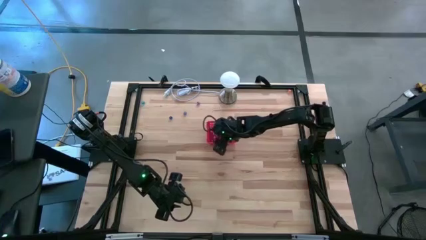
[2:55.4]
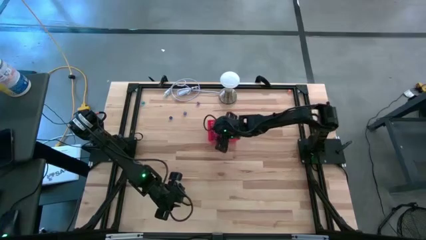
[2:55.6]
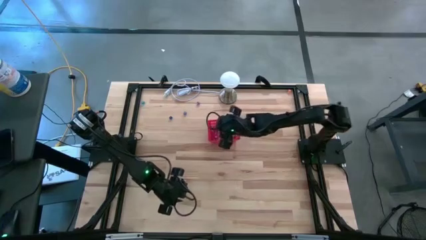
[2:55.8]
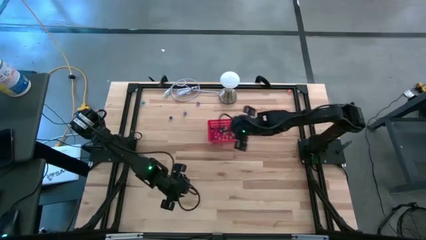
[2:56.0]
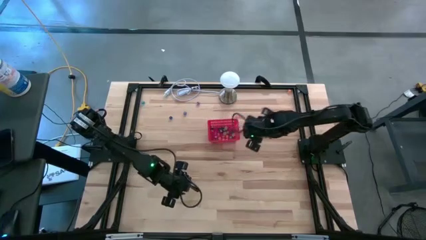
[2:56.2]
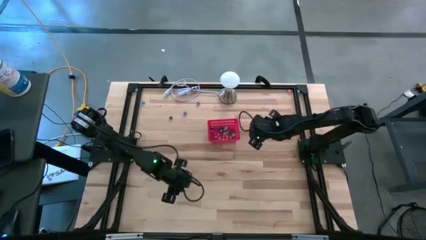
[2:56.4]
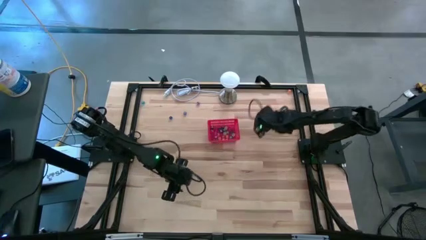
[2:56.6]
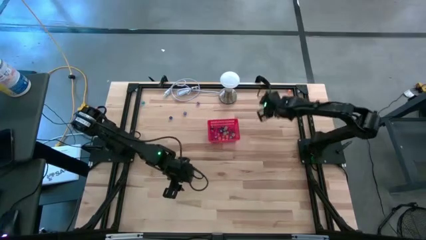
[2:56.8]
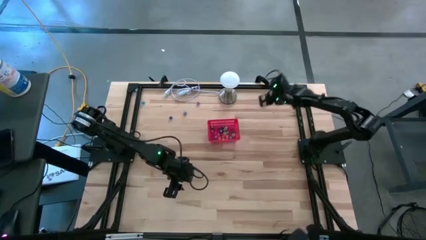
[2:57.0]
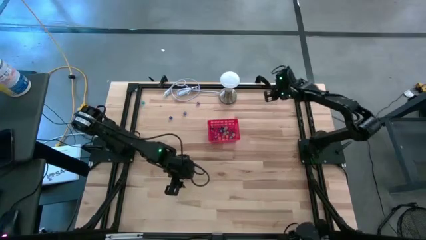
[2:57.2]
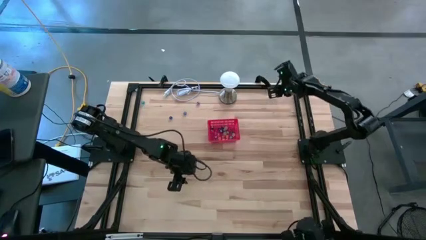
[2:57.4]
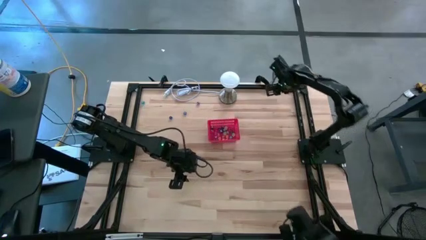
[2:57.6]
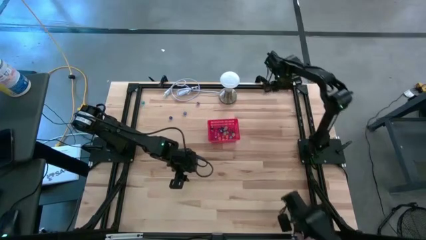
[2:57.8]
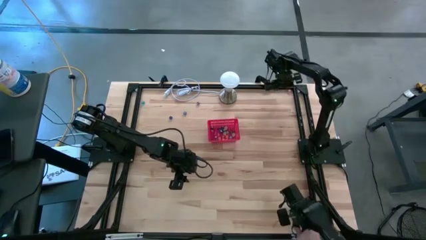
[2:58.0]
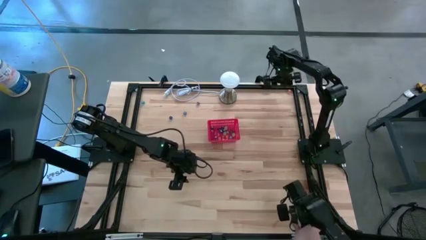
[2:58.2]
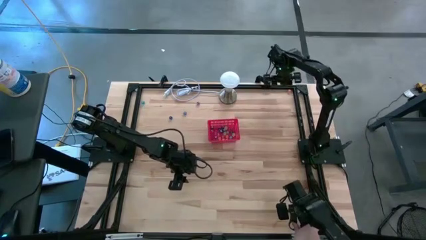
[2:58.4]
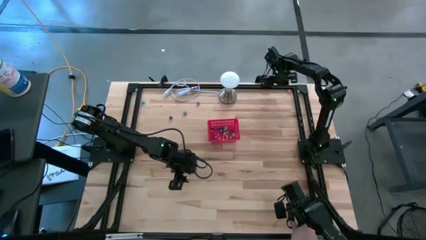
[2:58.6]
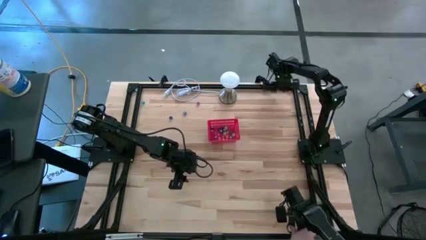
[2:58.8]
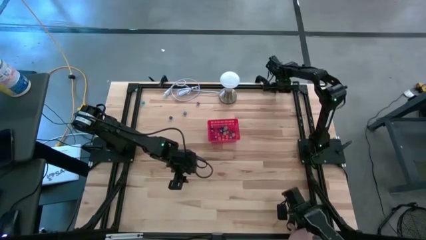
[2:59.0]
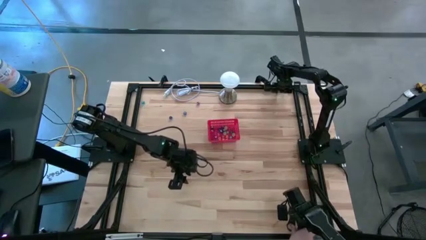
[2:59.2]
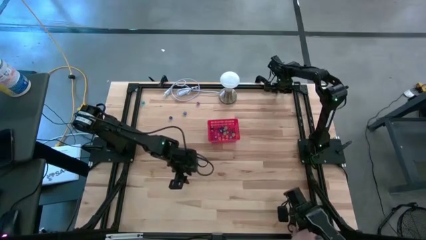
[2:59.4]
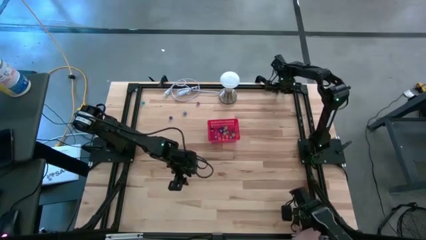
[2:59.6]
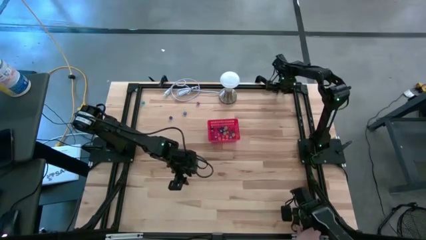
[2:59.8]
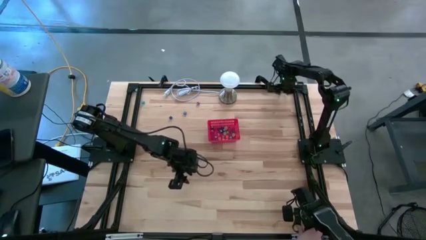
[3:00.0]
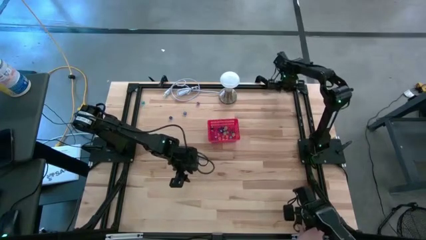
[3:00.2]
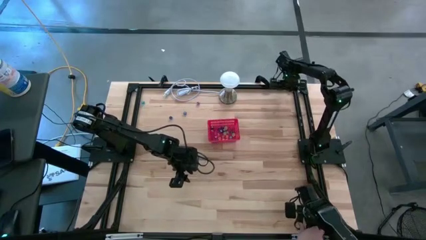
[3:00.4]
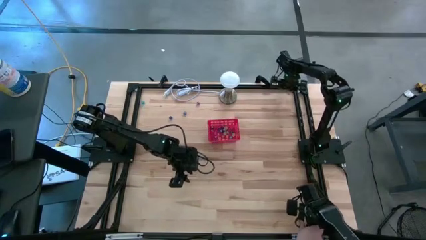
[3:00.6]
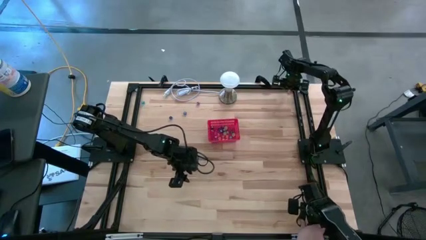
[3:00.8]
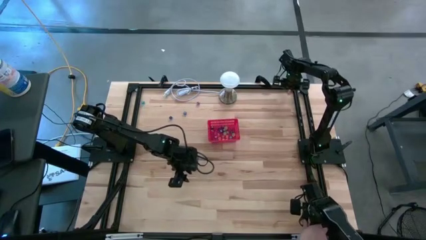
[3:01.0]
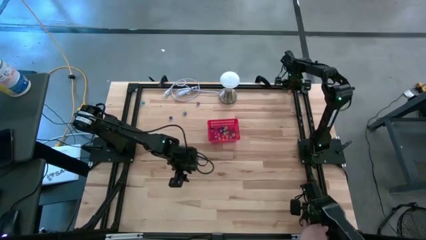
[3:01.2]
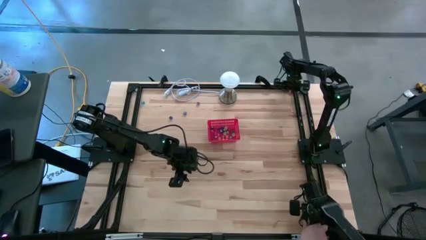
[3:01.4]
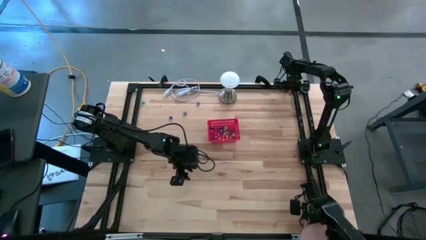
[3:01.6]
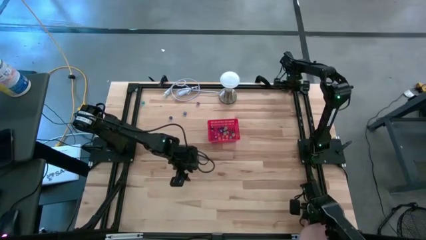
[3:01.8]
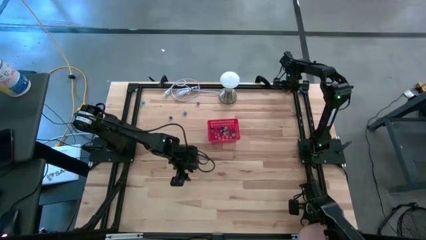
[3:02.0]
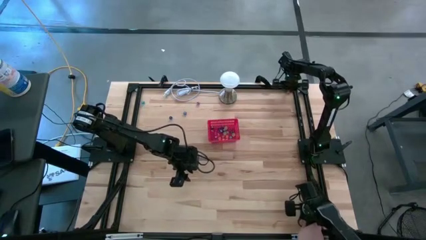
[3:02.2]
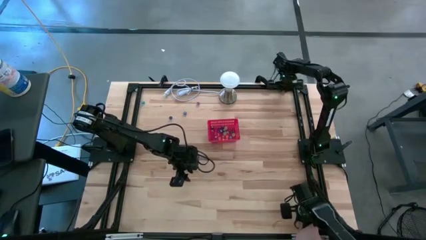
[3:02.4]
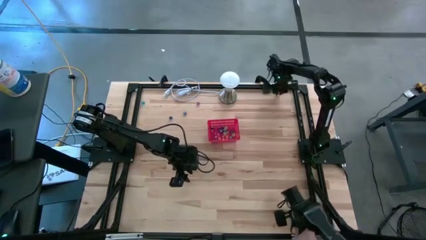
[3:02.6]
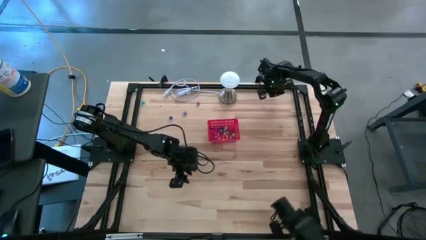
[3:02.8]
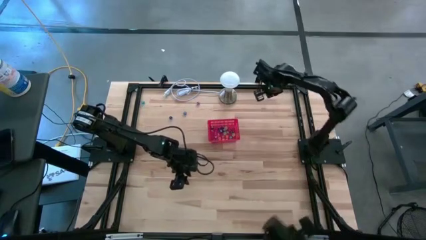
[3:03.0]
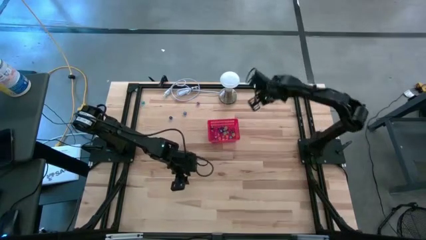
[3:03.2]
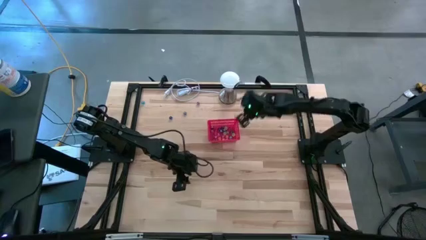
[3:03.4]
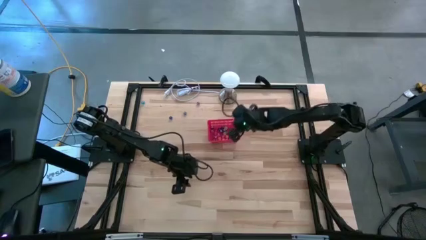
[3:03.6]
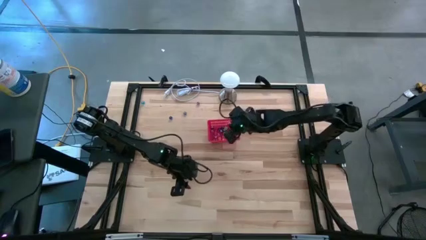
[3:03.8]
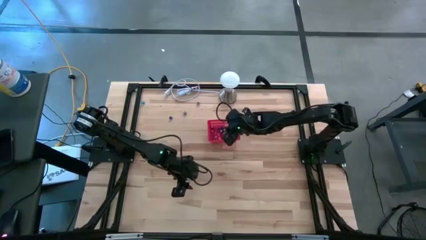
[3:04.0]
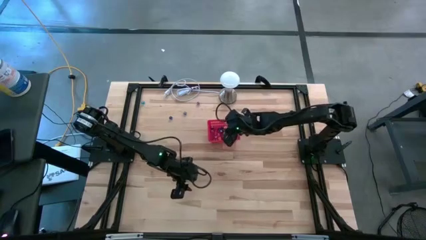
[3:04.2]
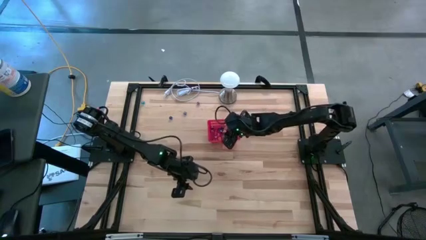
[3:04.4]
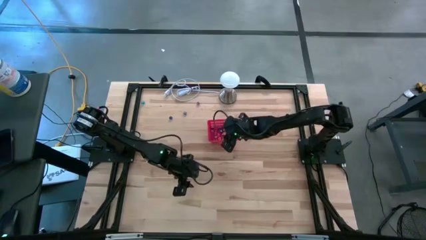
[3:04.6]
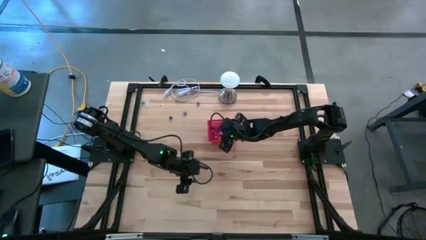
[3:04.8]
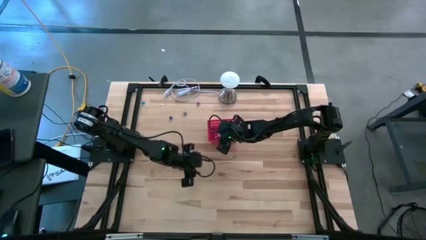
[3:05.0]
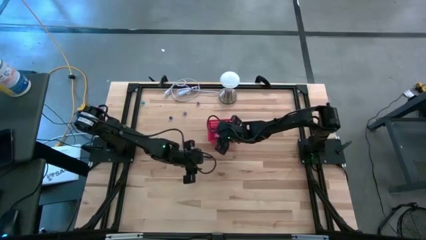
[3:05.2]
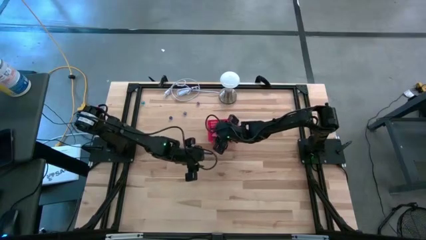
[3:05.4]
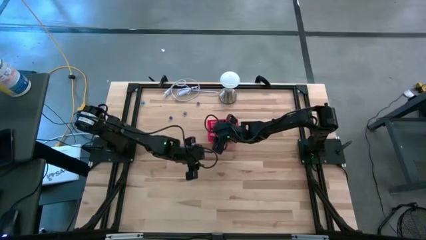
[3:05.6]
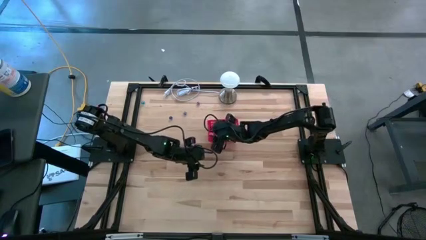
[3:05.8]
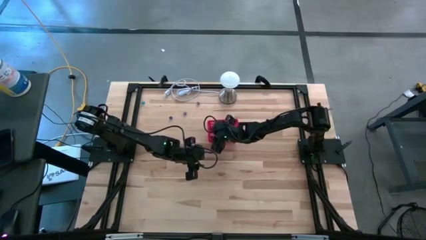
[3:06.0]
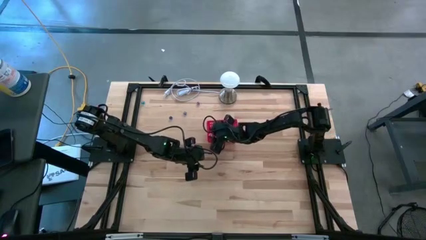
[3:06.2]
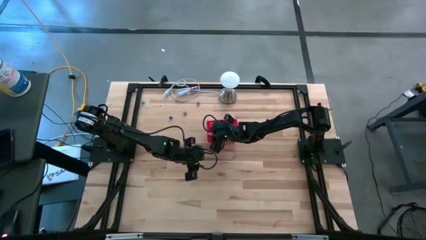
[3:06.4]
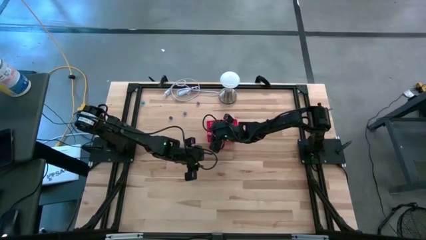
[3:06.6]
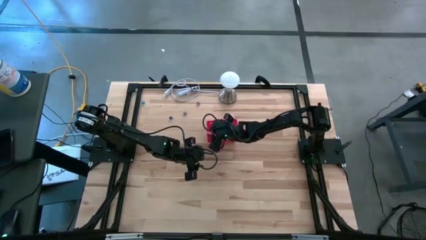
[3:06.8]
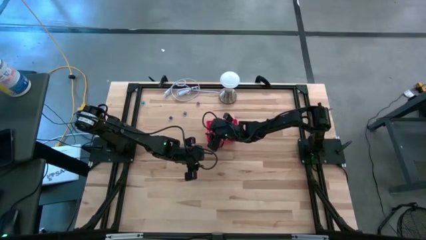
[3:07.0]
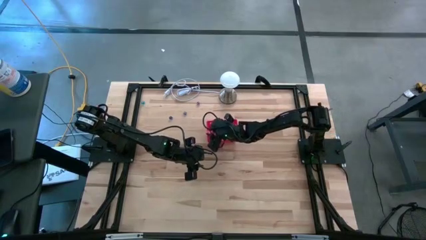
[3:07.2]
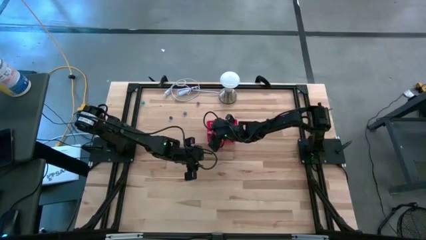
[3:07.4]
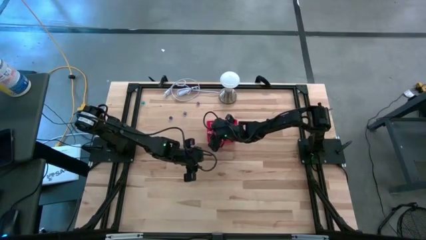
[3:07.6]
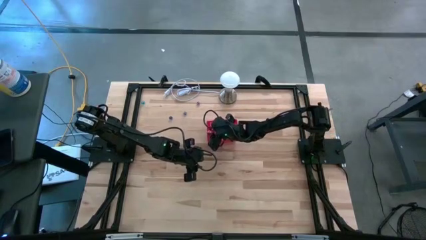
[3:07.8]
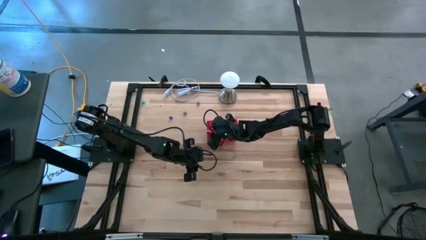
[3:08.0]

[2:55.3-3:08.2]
Task: Pick & Place Dice
Put the orange dice into the bin

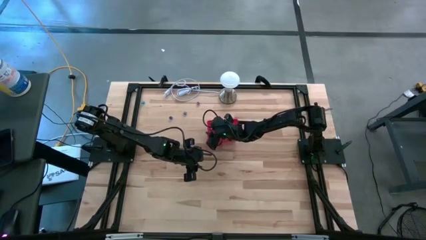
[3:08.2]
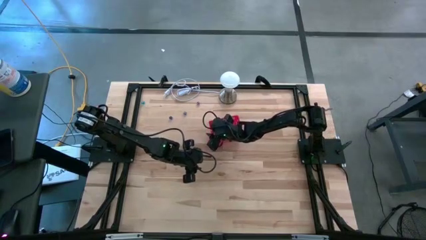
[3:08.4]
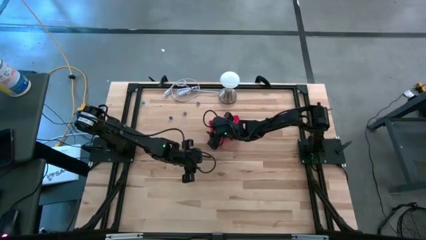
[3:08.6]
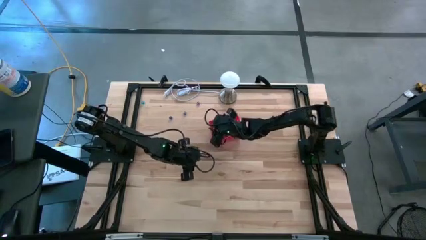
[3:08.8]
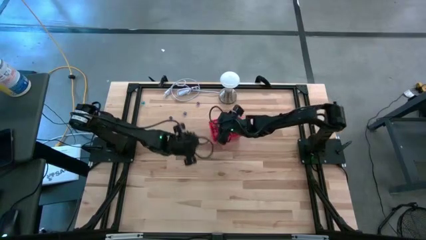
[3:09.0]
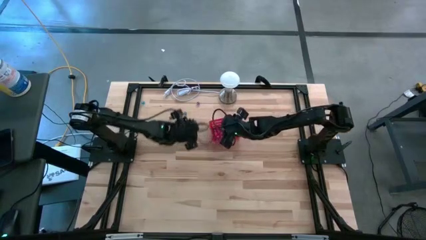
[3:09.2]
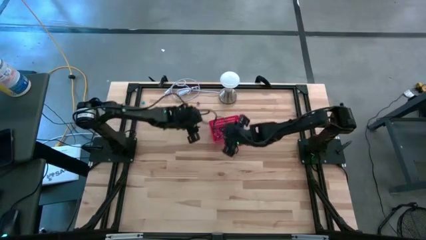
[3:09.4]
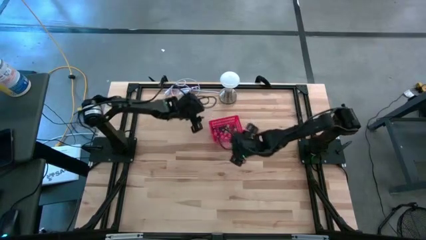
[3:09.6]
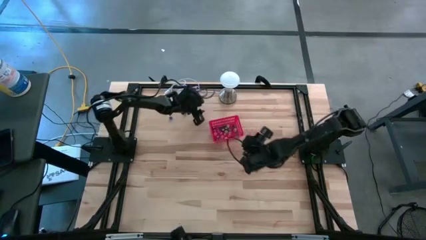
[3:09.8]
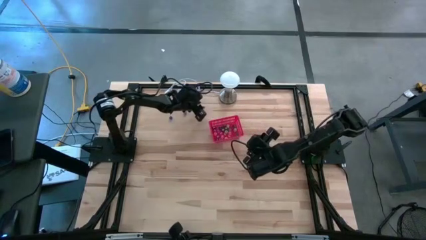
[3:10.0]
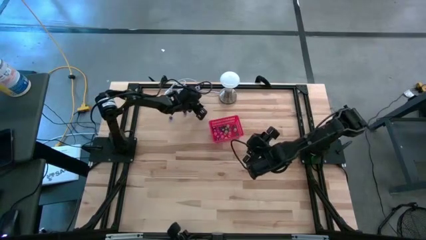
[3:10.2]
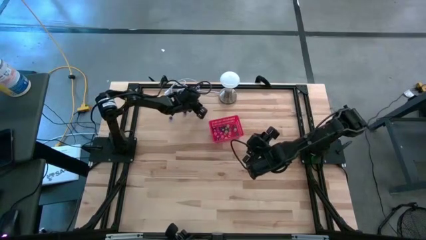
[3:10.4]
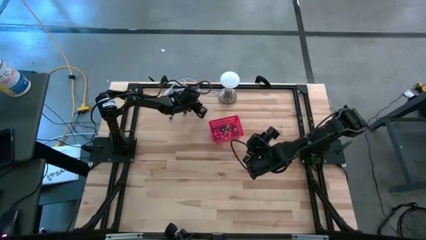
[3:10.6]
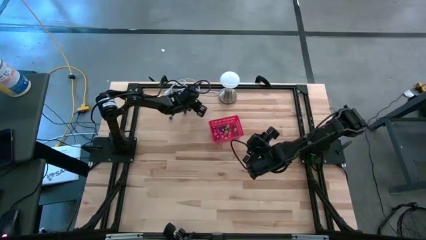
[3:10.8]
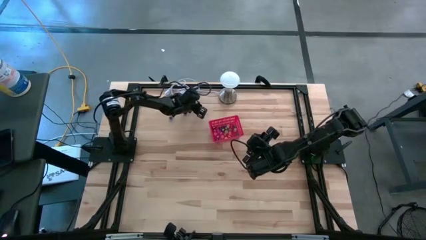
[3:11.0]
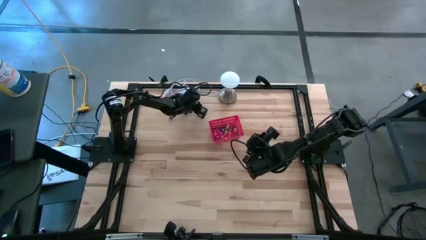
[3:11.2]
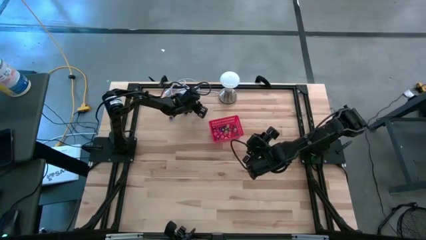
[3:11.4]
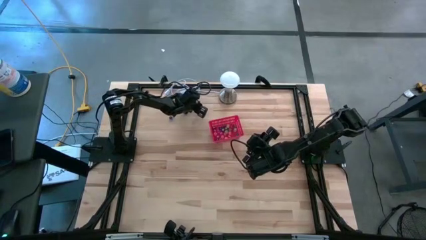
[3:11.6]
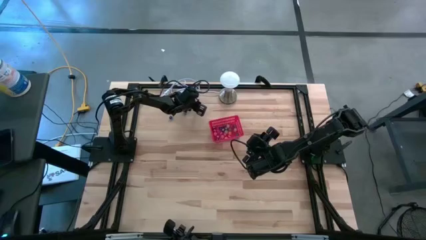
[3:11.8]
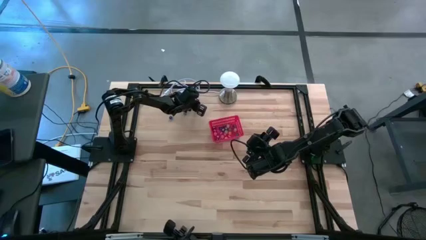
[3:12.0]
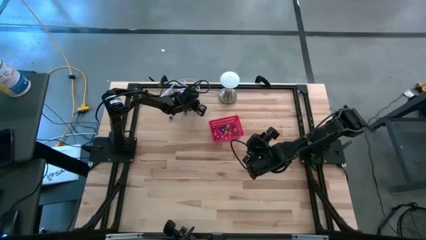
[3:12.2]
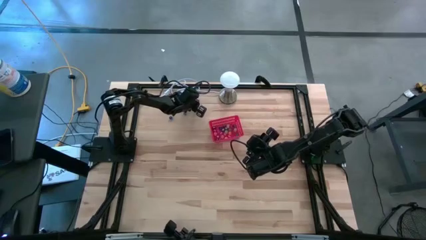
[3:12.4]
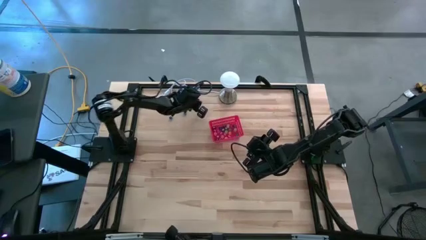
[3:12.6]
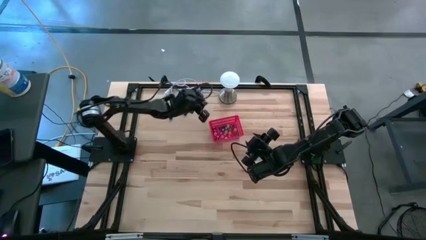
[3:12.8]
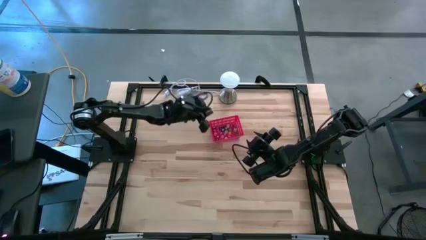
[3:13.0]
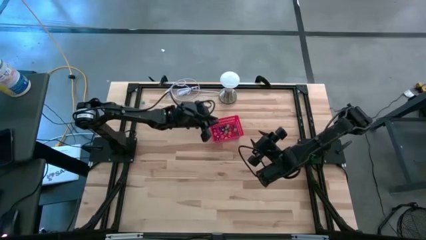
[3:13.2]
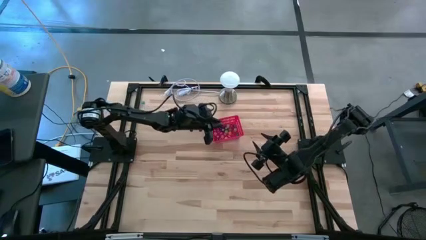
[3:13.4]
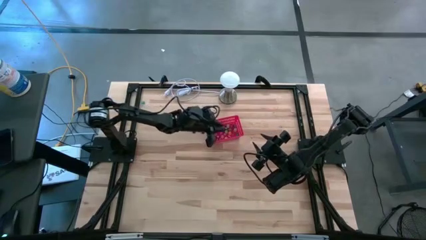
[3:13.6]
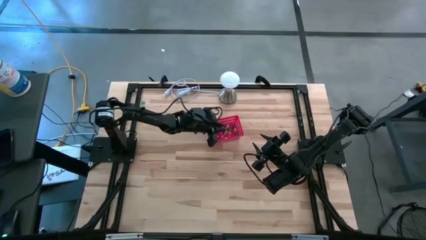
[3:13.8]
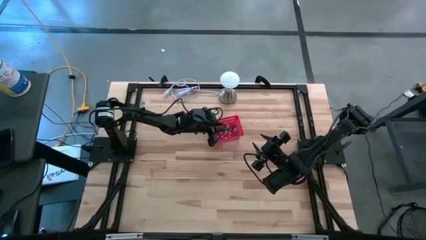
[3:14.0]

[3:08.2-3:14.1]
Put the purple dice into the bin
